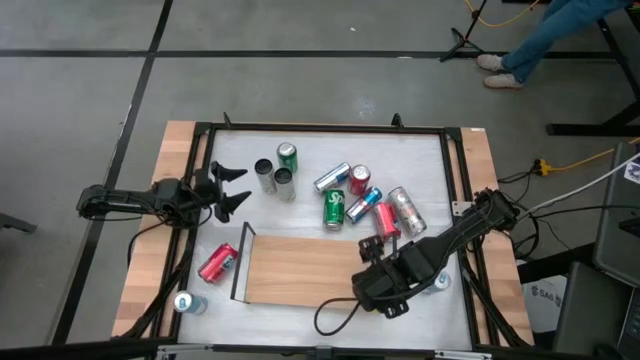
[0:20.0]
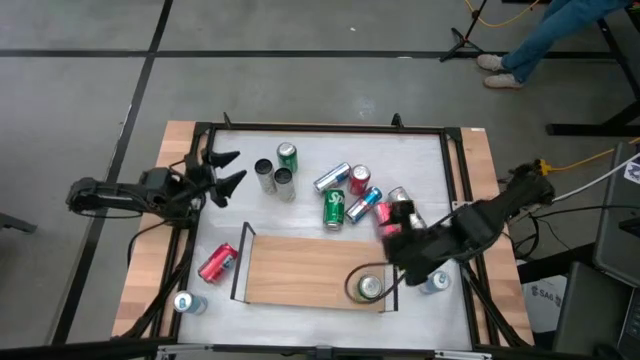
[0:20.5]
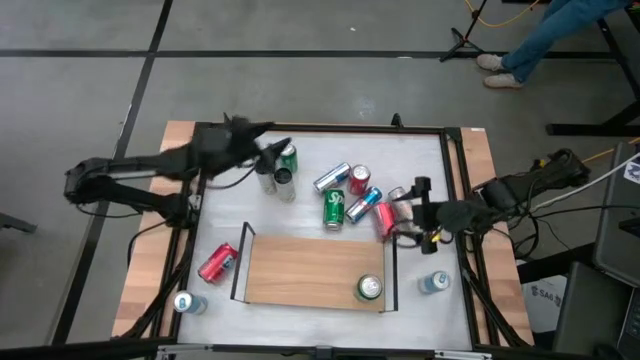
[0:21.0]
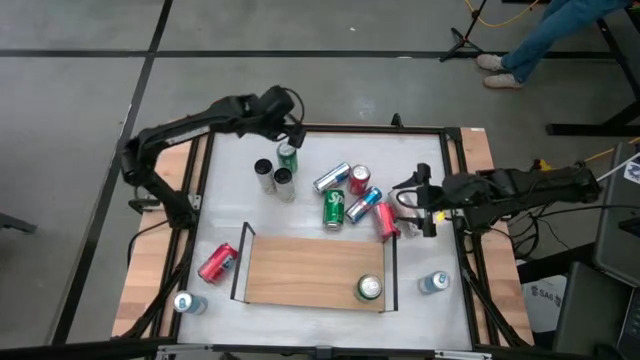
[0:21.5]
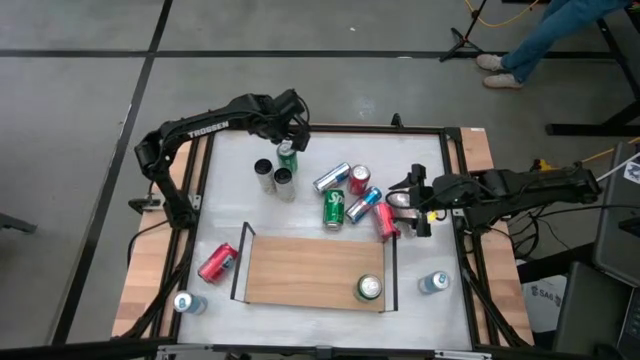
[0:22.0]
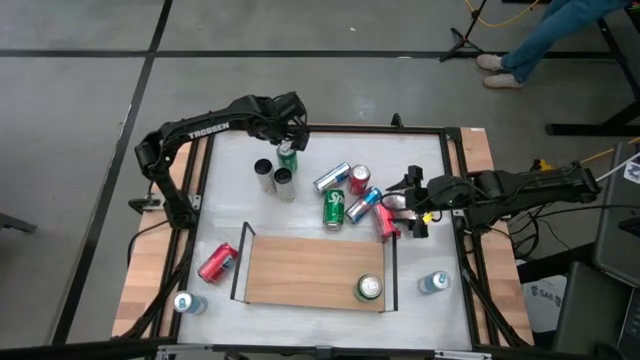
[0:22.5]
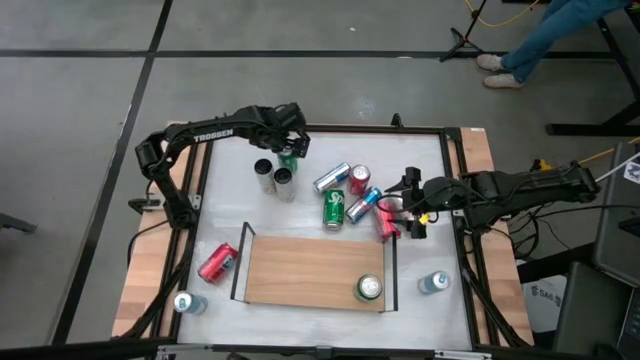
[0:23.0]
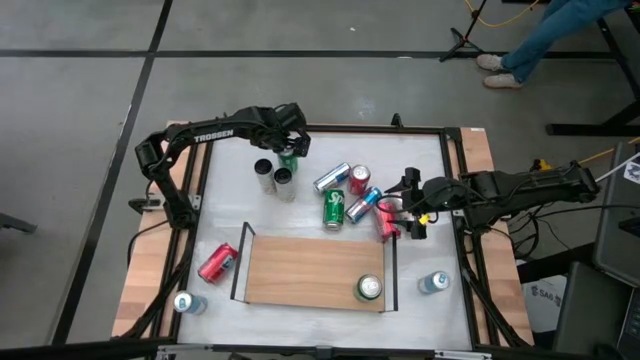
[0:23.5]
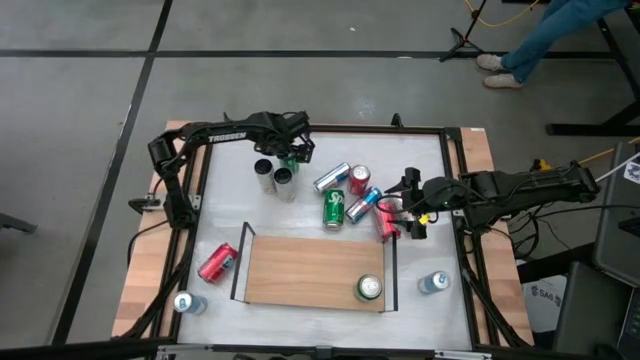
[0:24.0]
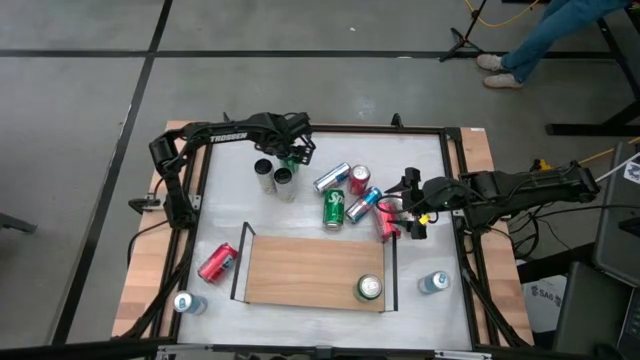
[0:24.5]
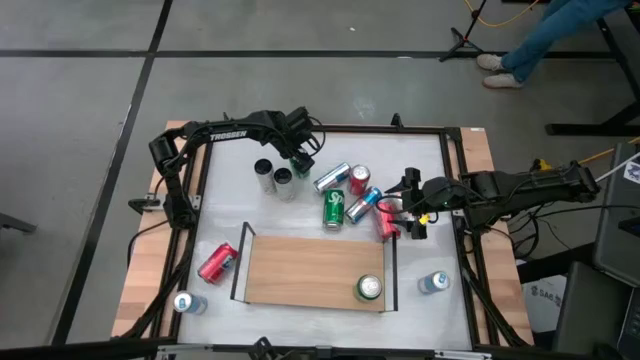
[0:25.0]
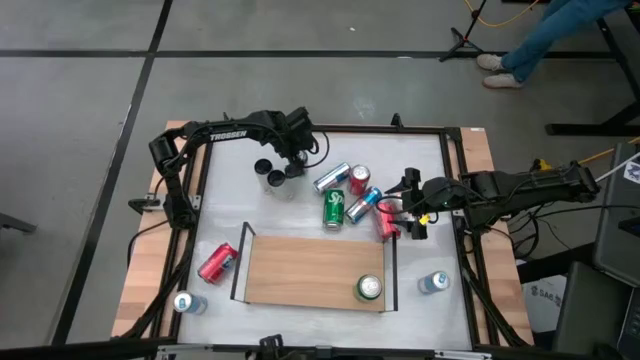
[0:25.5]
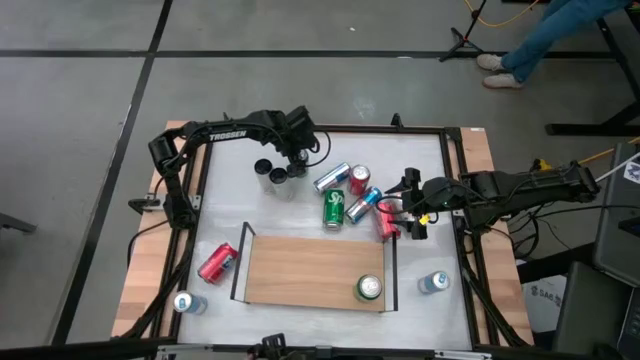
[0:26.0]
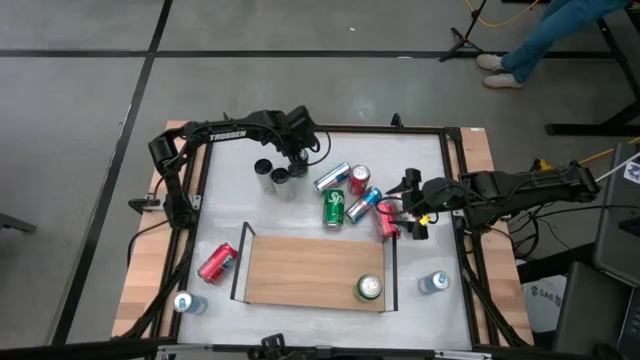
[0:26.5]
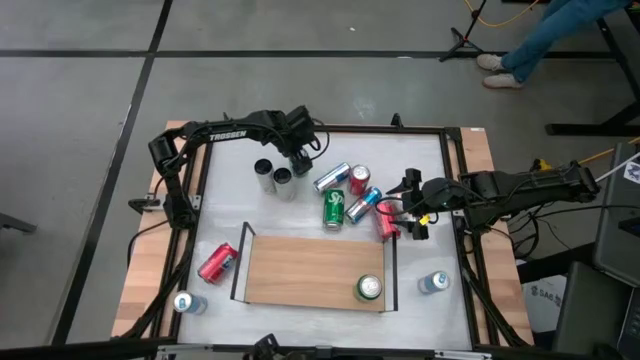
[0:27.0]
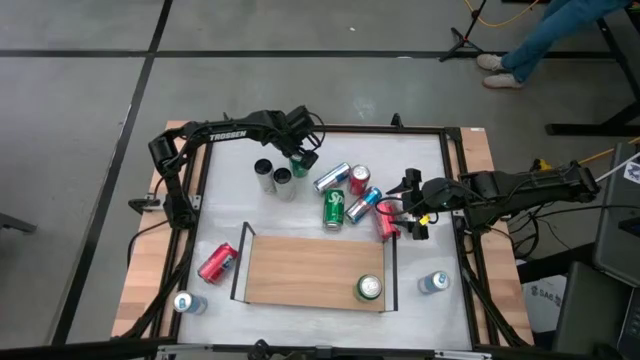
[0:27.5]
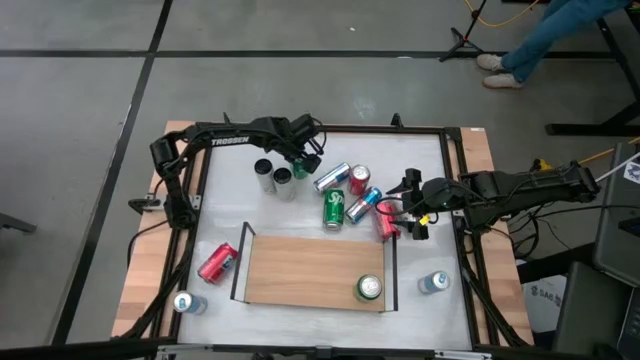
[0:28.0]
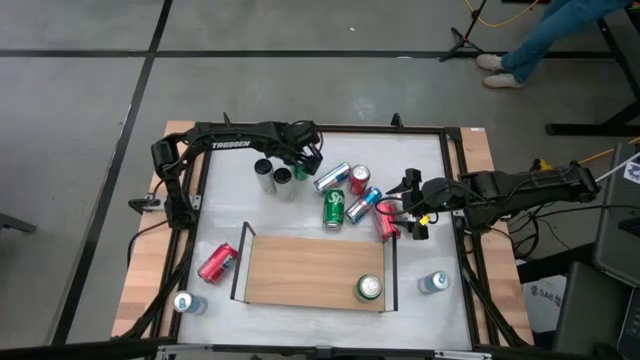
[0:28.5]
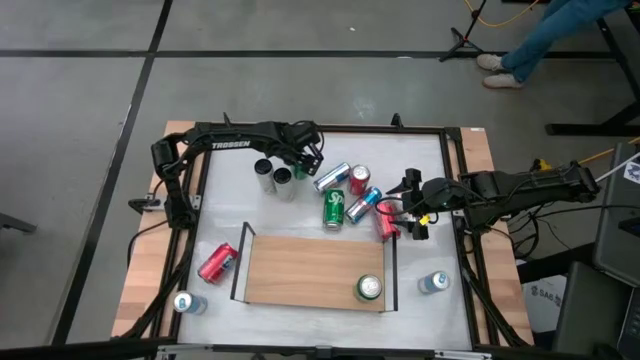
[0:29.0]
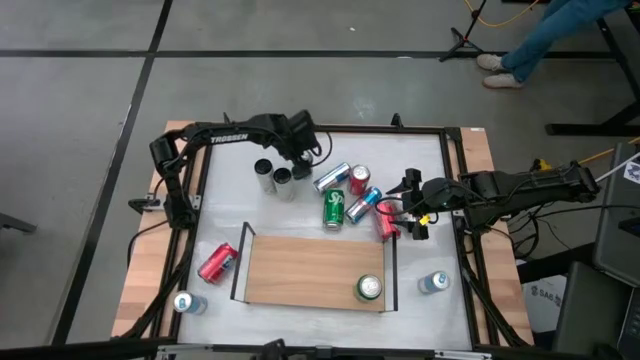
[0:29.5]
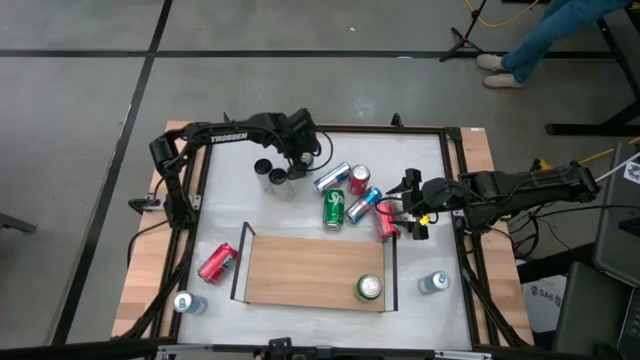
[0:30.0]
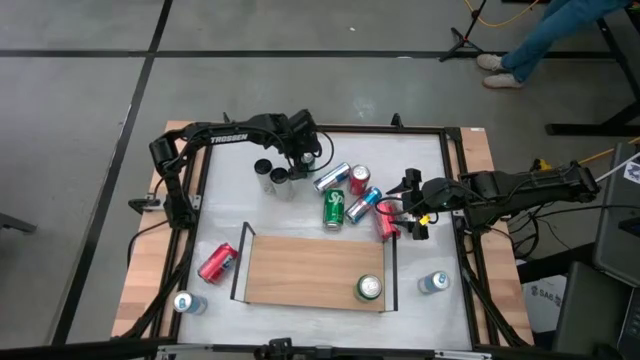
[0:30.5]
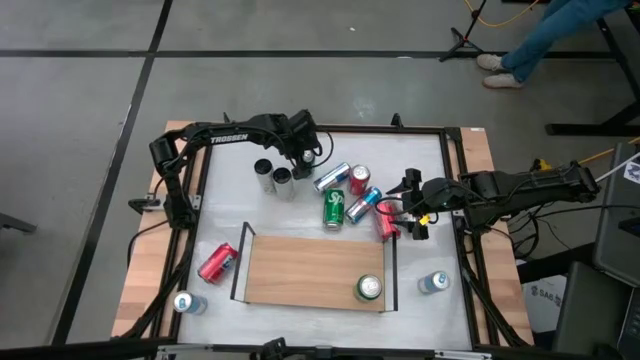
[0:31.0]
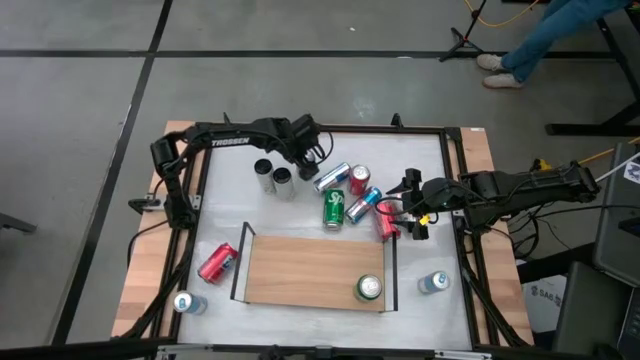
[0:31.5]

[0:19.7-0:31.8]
Task: Place canned beverage on shelf
Put the top green soda can on the shelf aligned with the other green soda can

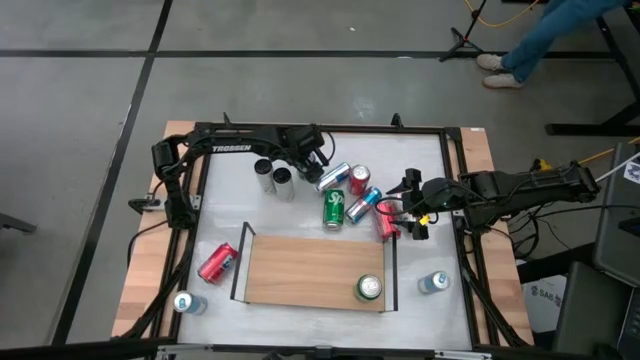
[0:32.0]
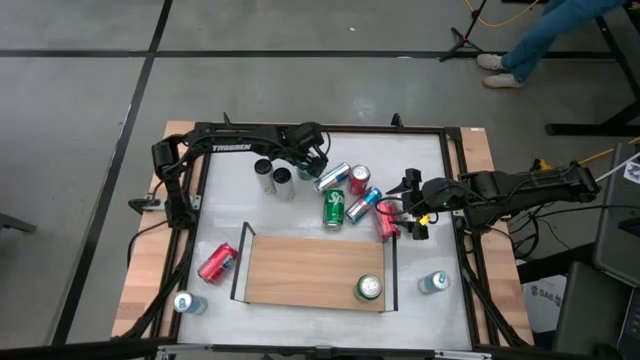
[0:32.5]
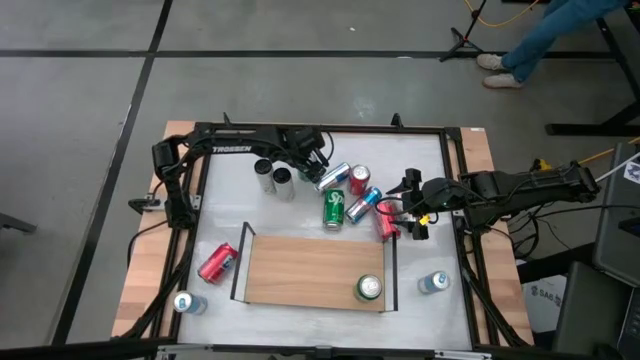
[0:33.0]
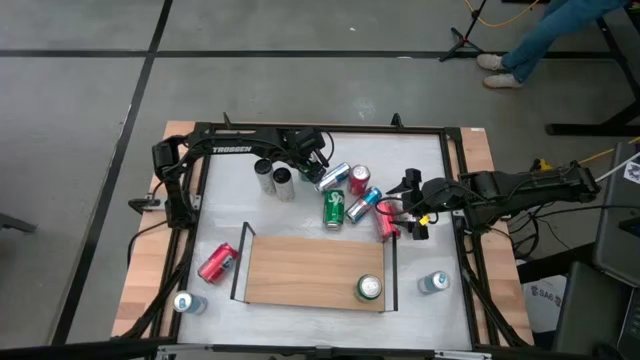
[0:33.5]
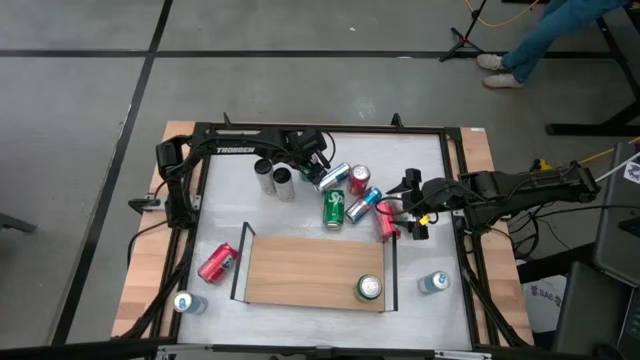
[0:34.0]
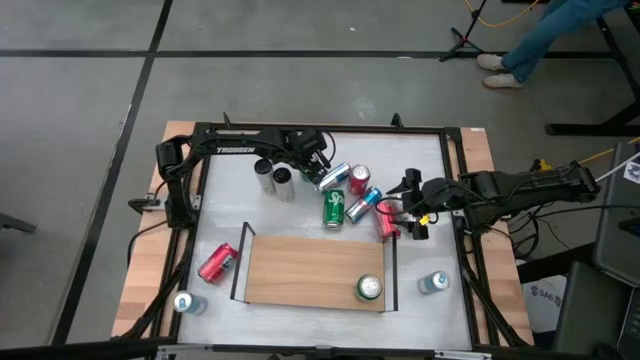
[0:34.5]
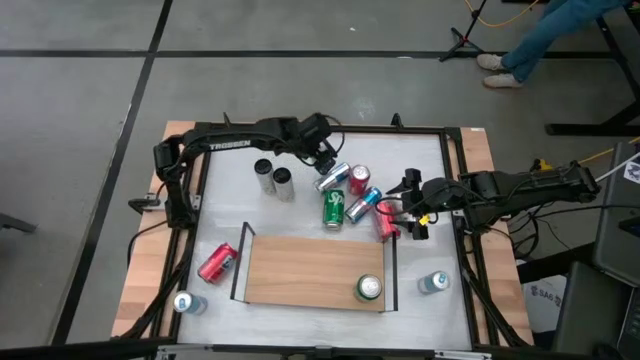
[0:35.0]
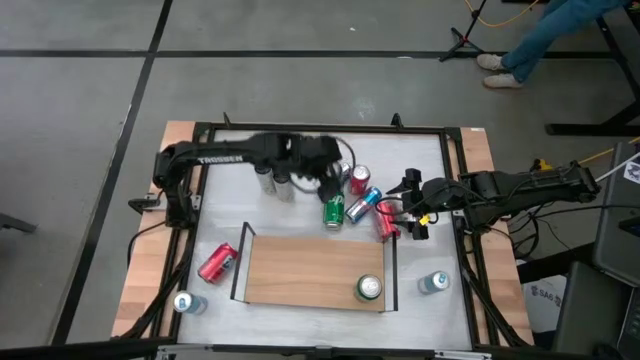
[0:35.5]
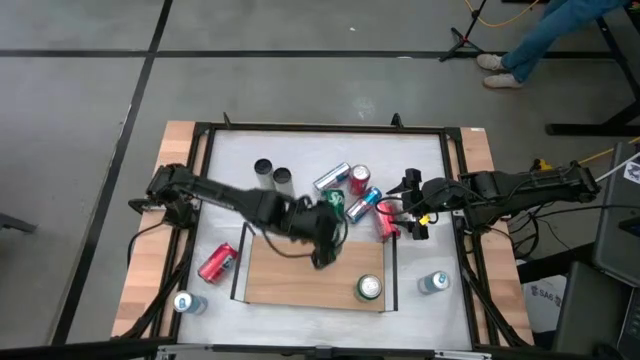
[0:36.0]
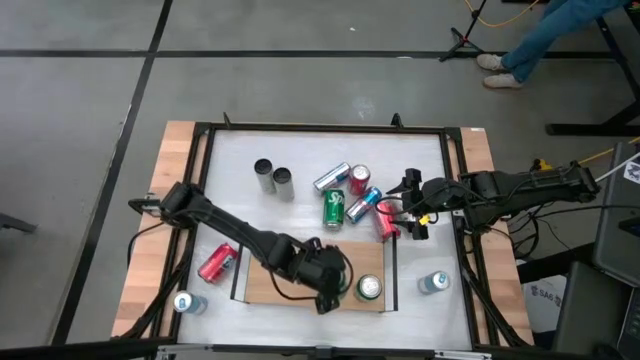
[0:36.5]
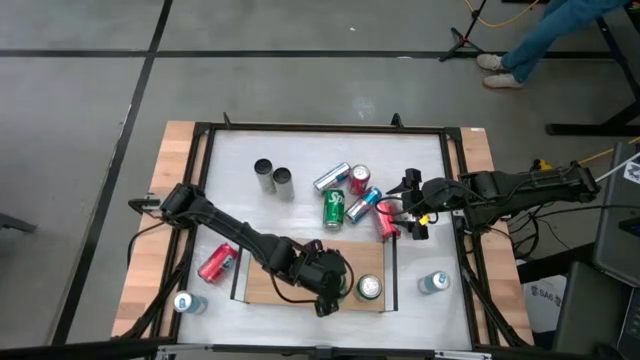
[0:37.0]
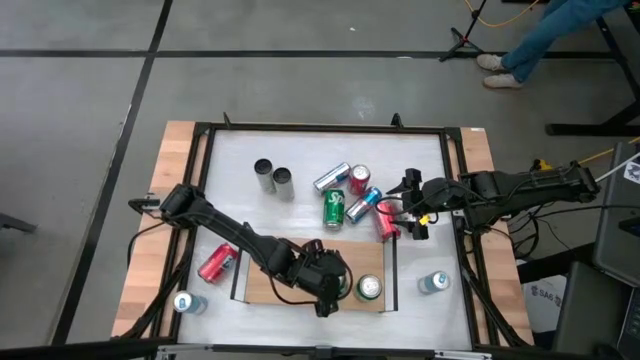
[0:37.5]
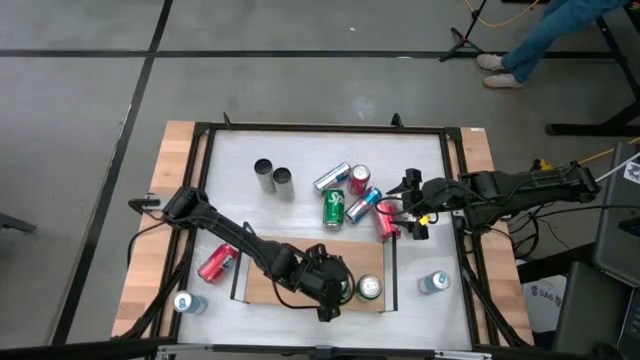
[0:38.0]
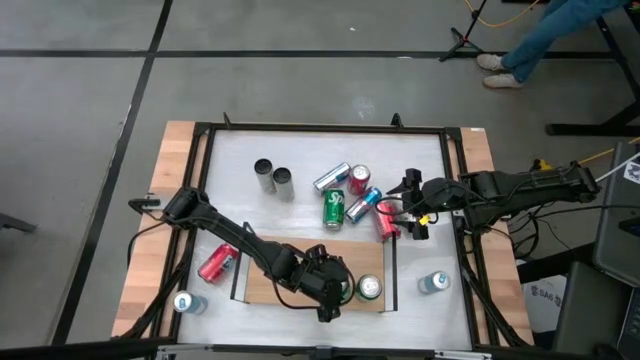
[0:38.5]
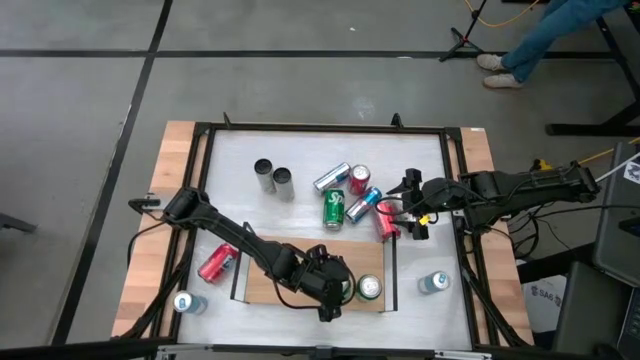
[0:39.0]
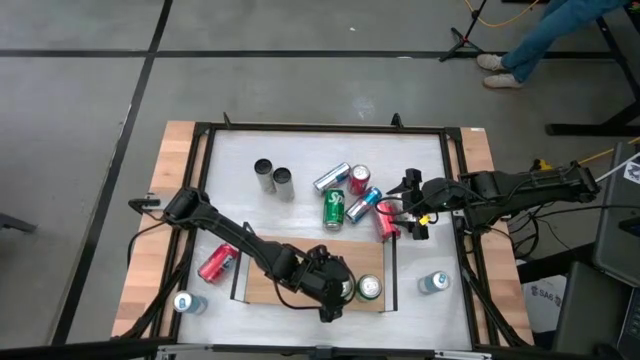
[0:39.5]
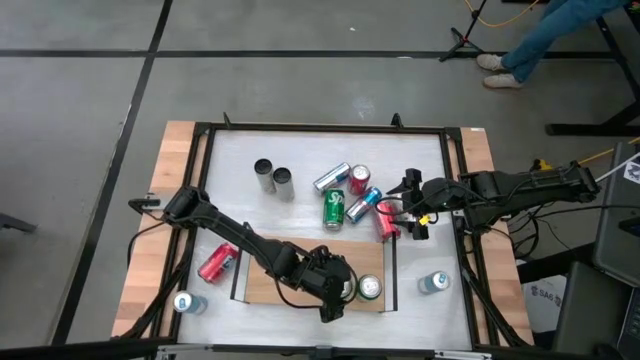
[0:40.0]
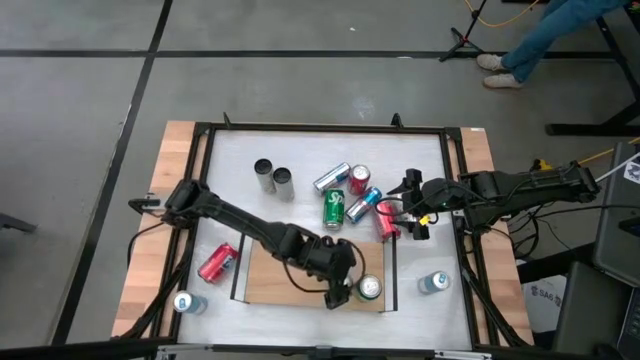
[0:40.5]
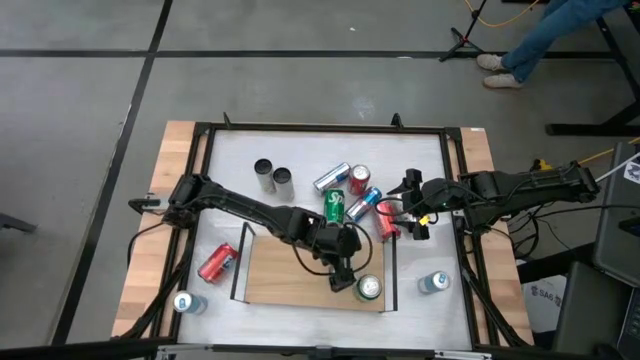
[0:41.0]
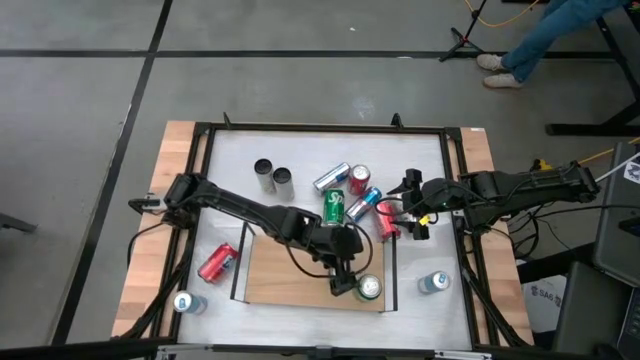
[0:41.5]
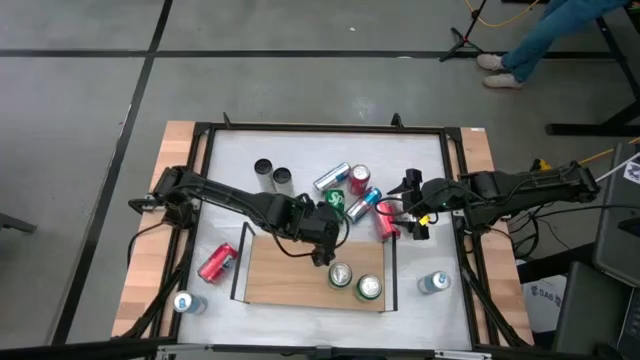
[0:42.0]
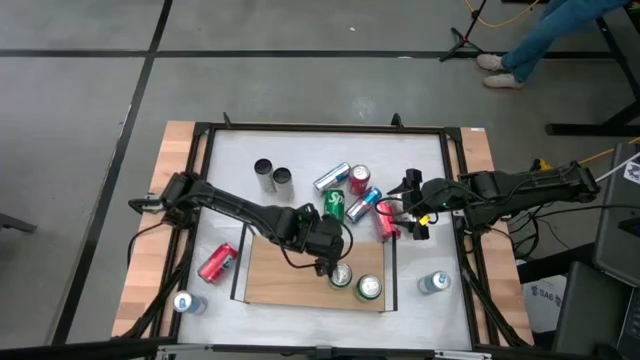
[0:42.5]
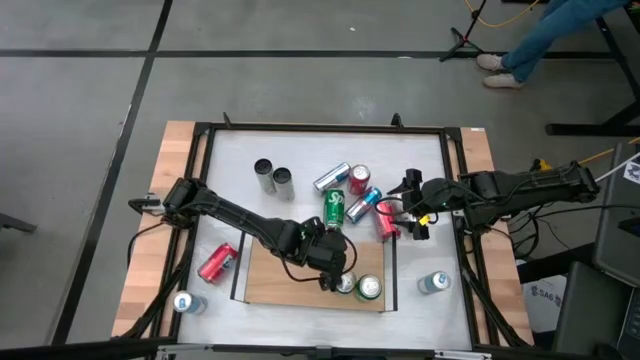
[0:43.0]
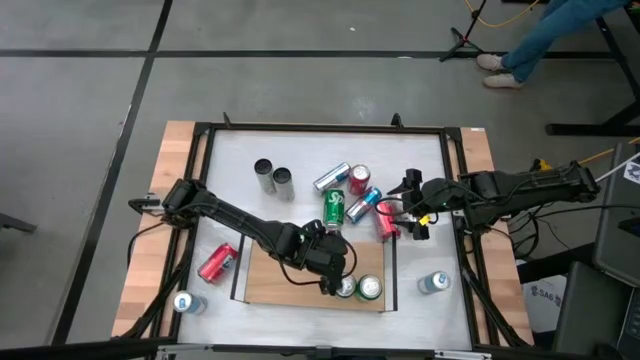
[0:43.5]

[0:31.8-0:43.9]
Put the top green soda can on the shelf aligned with the other green soda can
